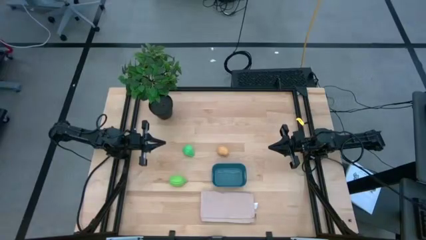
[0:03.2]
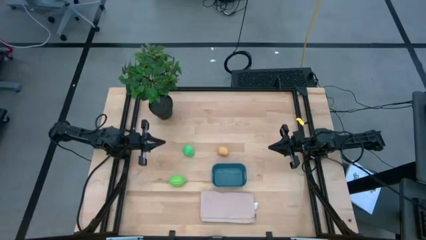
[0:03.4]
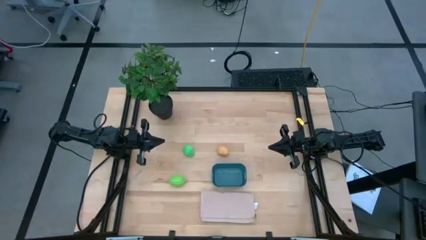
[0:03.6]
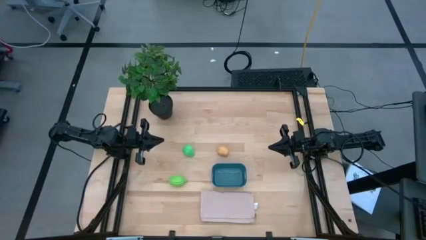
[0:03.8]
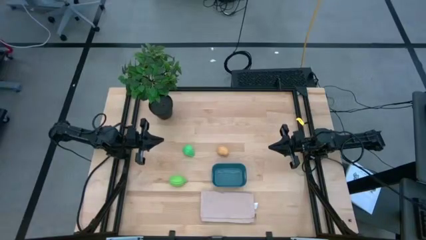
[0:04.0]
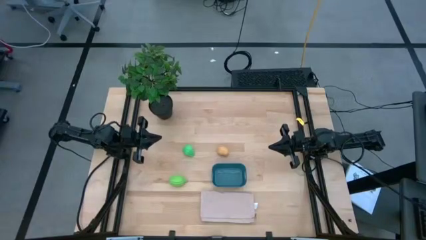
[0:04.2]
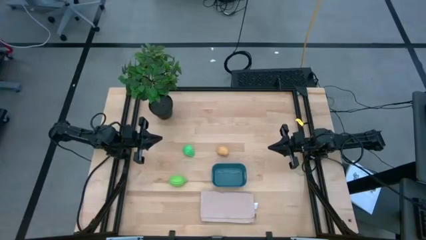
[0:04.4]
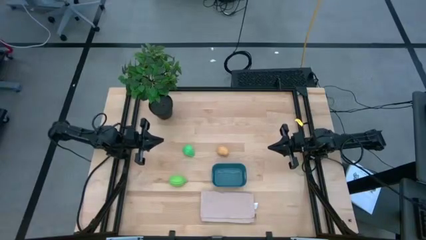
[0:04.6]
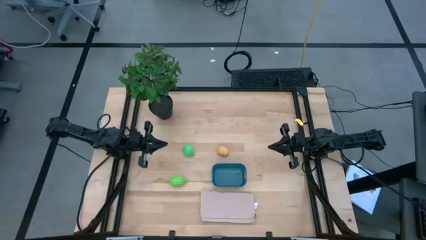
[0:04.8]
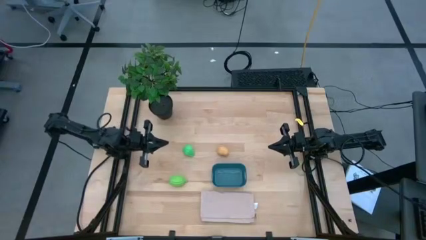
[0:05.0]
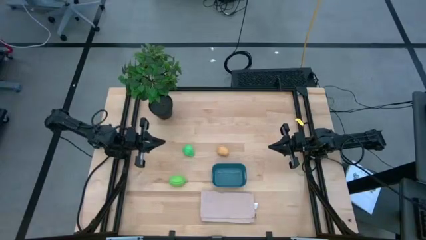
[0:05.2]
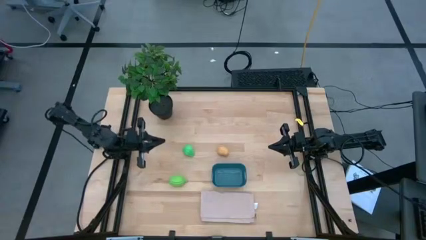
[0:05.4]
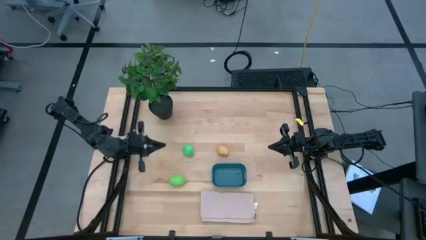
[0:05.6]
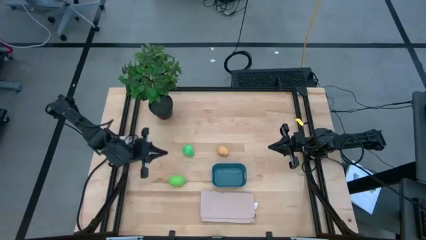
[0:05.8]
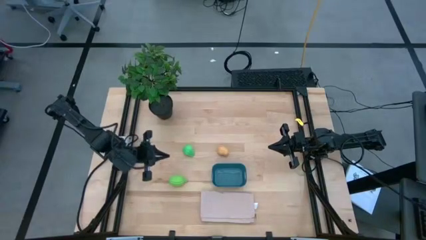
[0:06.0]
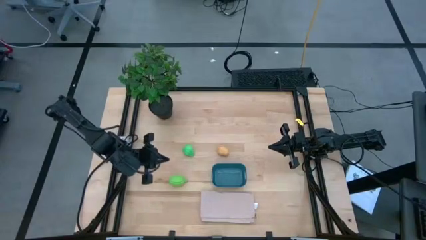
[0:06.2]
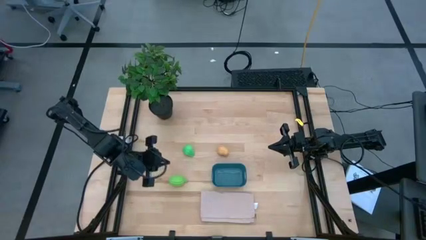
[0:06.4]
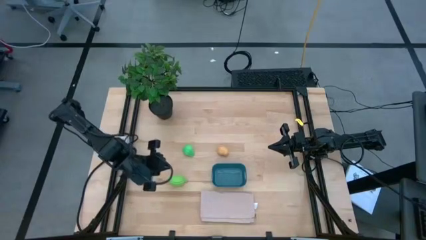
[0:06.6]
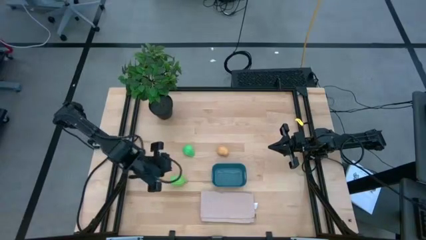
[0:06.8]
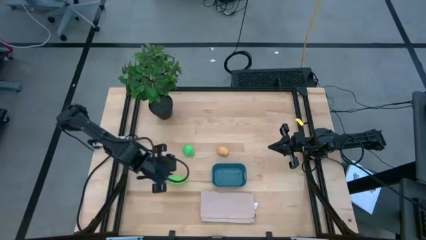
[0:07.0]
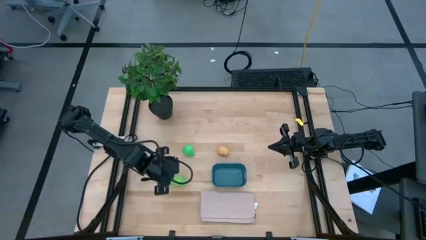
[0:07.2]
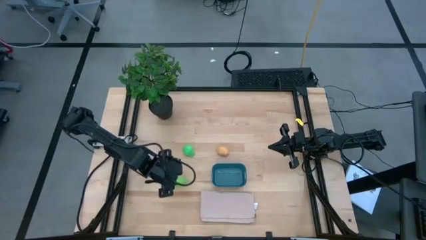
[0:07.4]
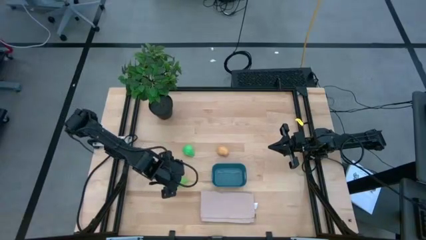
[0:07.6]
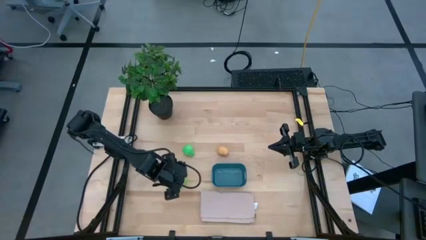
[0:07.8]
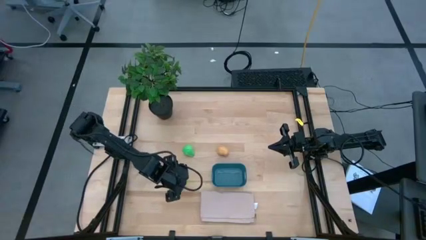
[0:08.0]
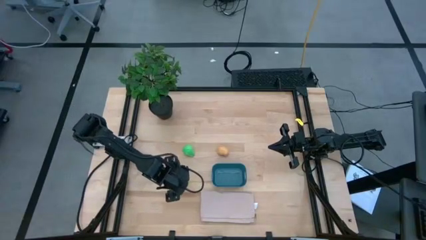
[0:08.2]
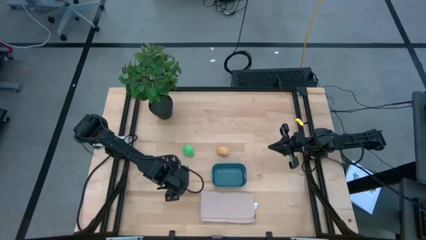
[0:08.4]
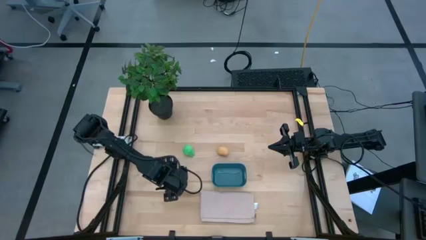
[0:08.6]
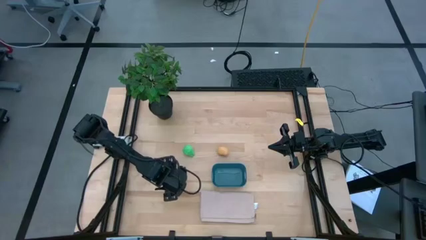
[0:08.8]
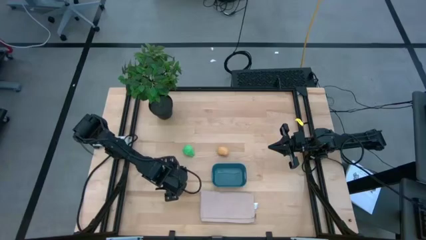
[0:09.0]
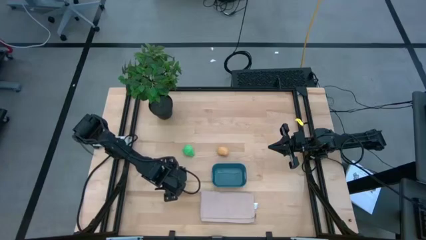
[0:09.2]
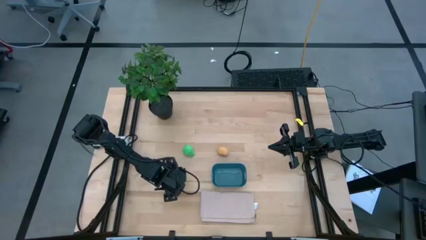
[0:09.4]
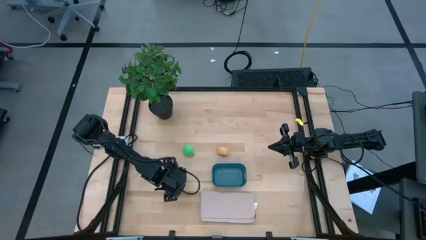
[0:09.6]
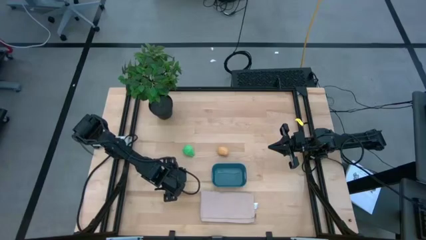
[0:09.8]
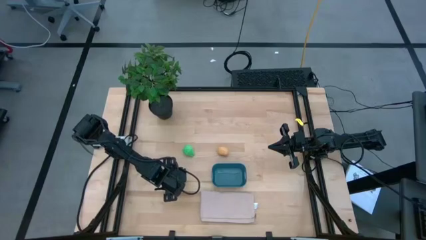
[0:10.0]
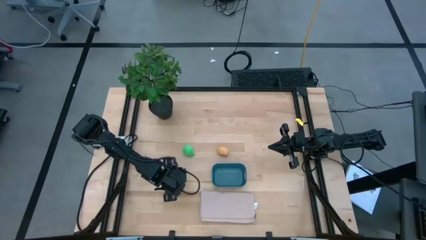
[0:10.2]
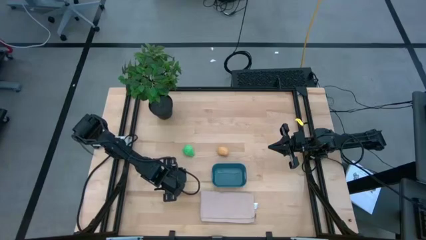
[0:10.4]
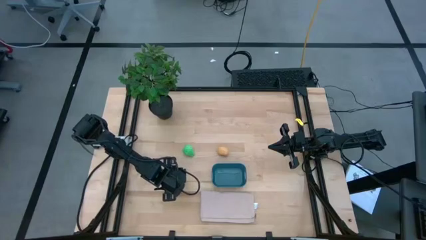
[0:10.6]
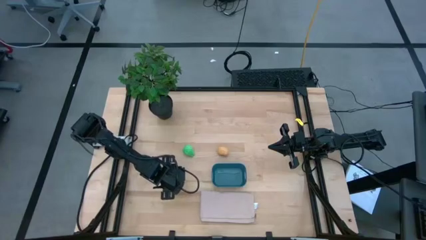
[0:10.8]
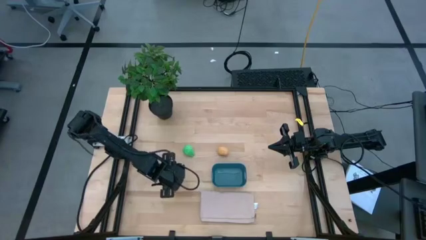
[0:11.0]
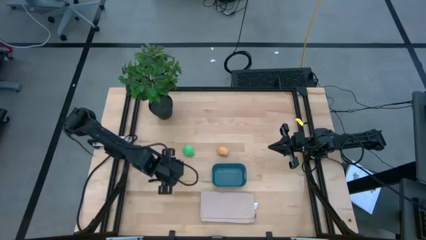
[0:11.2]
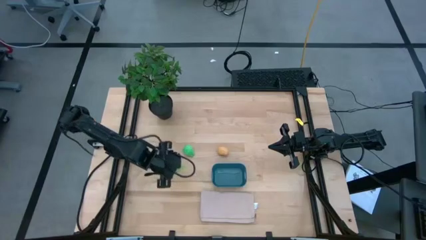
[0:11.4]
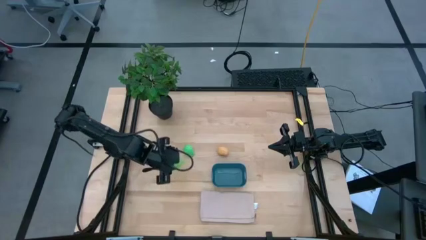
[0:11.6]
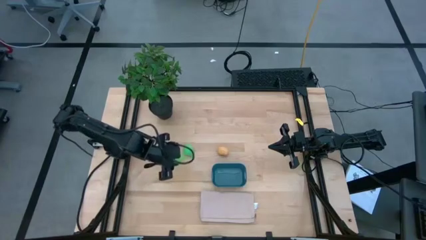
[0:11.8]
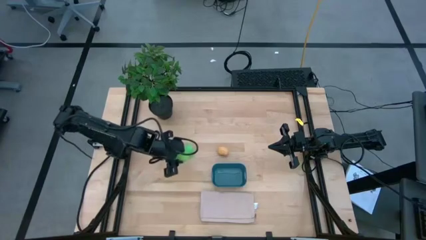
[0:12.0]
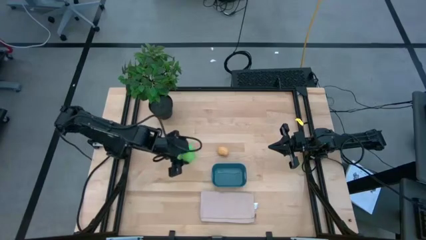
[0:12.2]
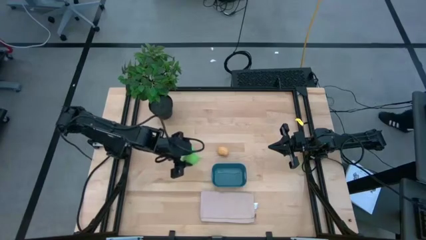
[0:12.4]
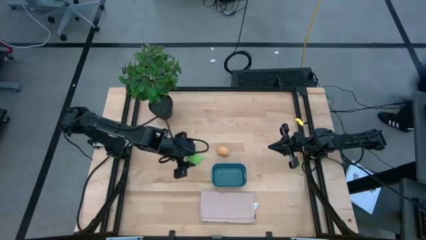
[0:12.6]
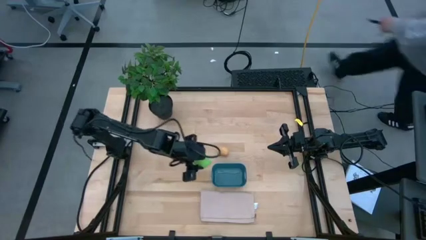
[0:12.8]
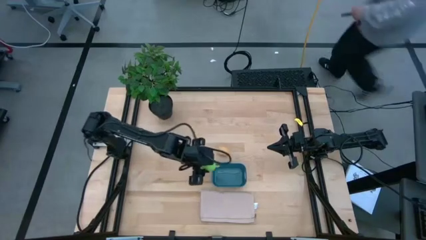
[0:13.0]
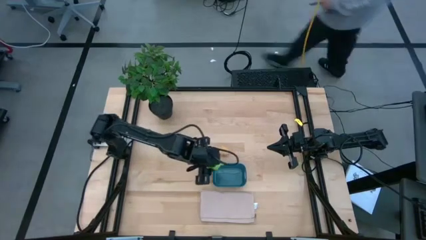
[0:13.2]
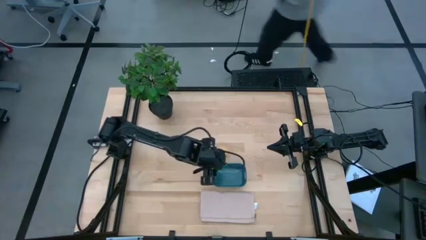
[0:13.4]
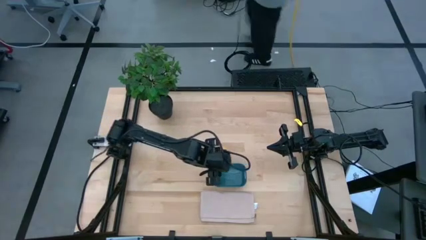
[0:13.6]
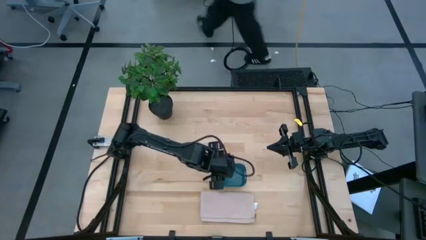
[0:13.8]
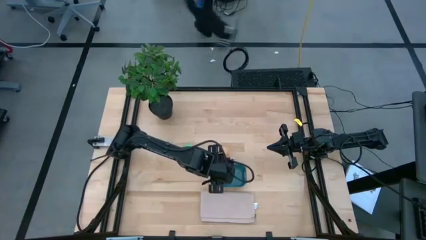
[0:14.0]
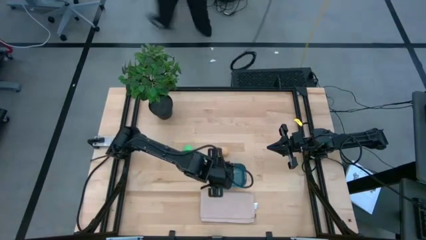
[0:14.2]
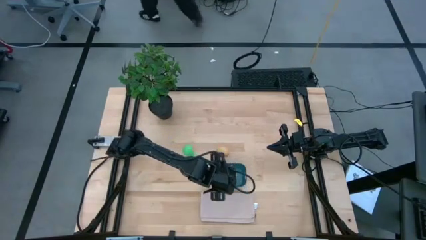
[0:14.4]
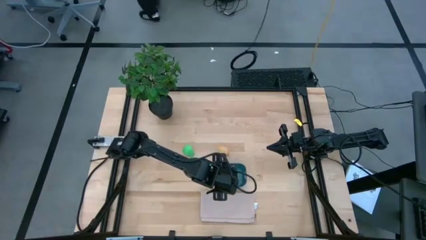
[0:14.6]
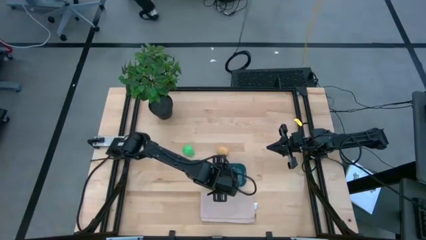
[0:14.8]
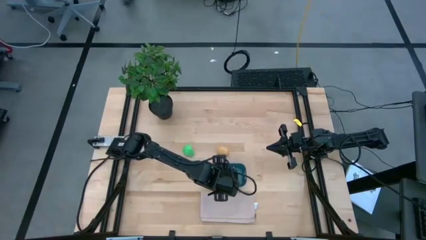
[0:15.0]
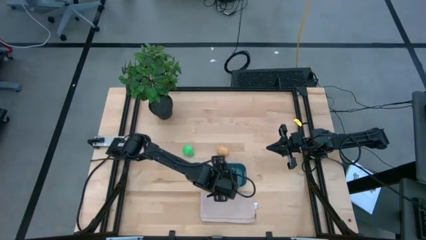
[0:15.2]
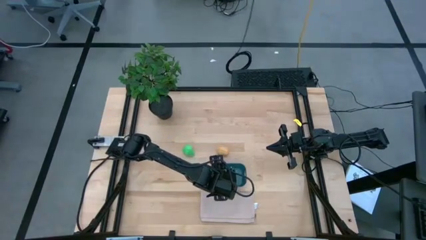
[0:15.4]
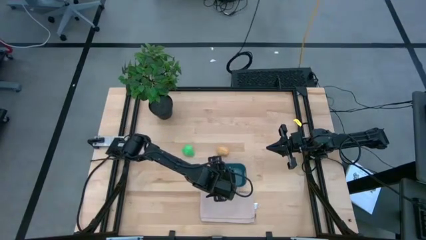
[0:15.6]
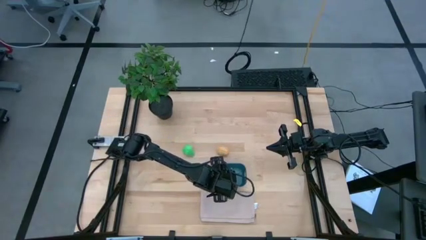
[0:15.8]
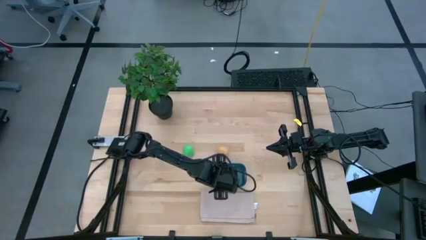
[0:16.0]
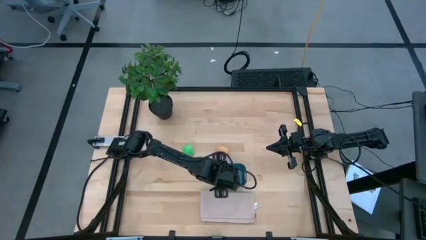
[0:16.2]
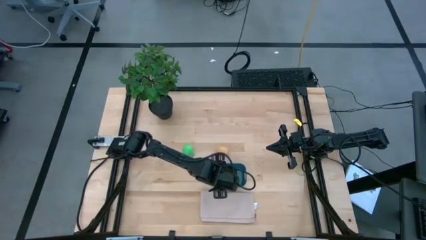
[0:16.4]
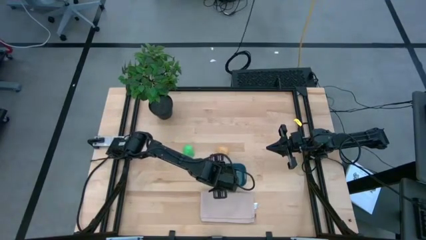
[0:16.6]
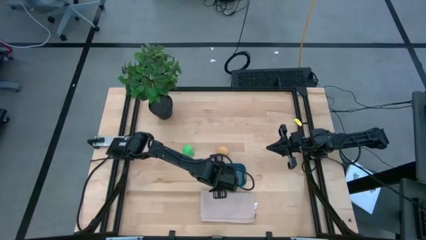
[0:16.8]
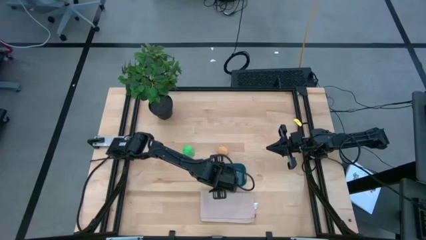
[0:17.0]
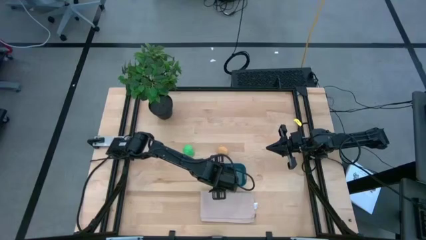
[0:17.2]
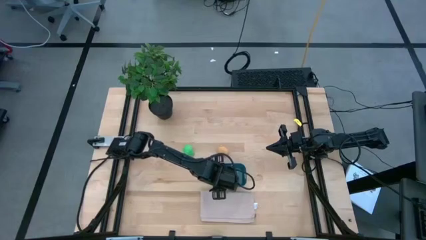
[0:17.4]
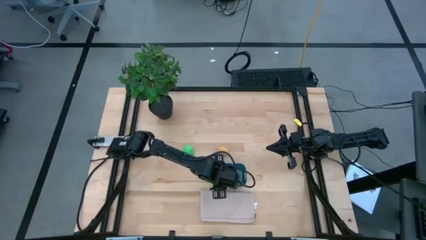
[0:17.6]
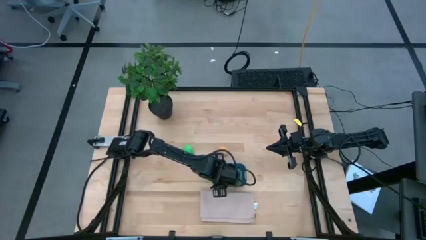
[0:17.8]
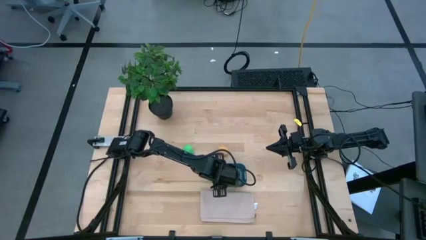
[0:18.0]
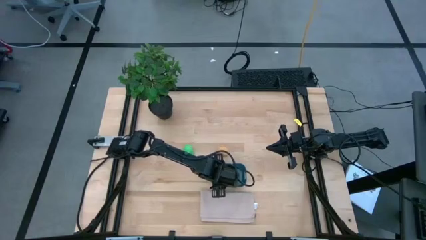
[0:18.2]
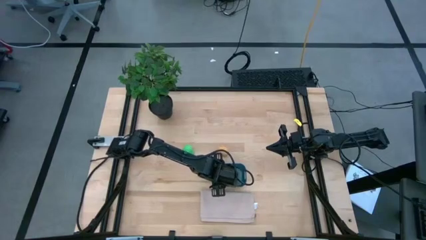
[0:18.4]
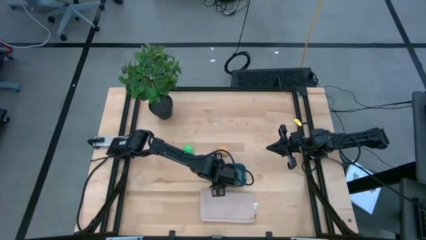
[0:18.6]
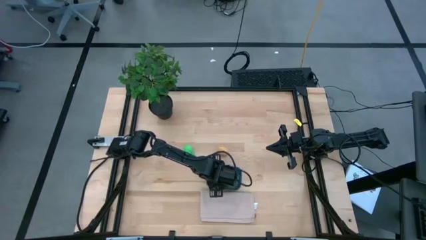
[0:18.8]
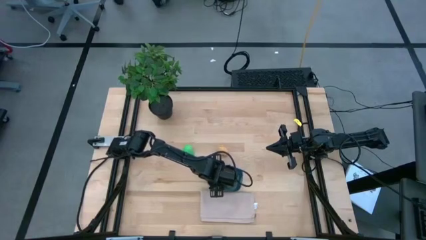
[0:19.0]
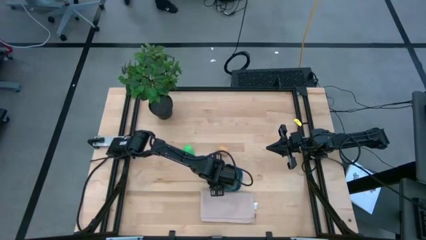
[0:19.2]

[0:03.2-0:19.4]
Task: Pick and placing Produce into tupperware
Put the green melon into the blue bin
